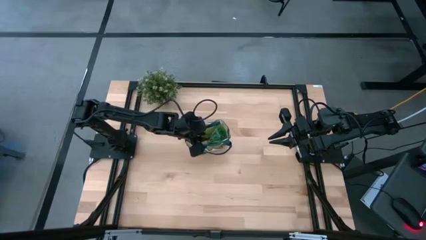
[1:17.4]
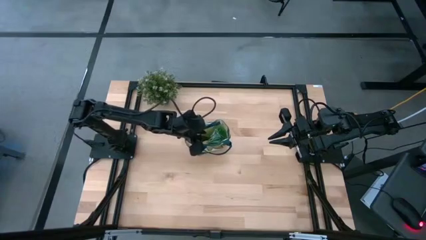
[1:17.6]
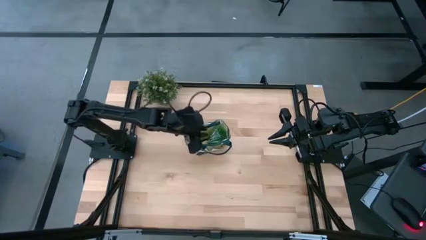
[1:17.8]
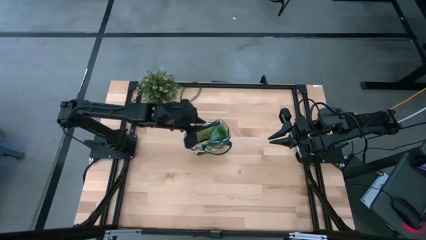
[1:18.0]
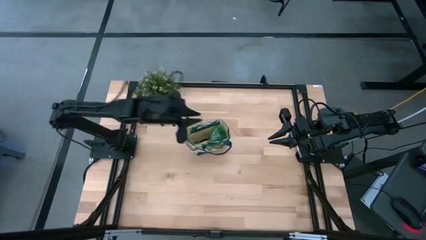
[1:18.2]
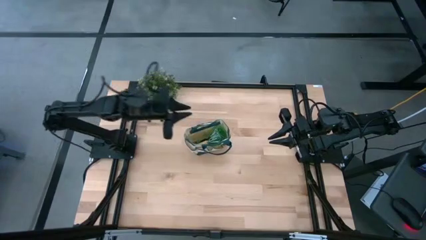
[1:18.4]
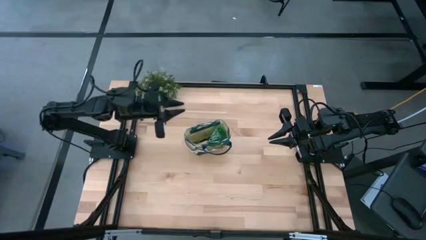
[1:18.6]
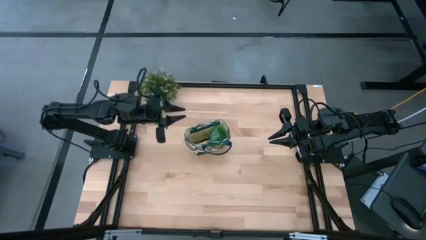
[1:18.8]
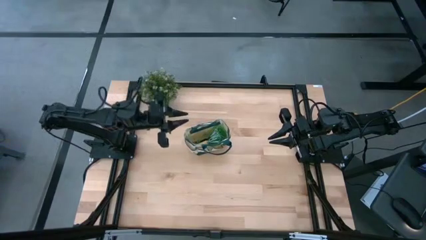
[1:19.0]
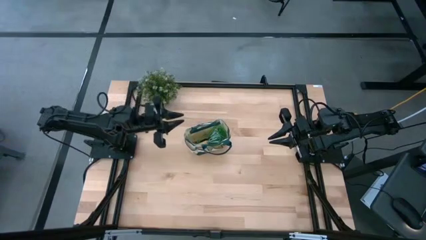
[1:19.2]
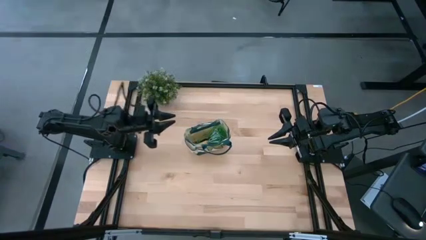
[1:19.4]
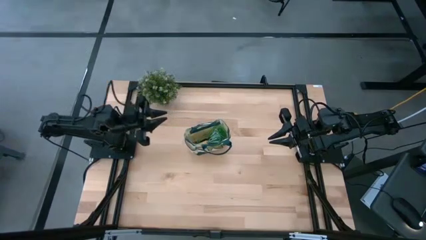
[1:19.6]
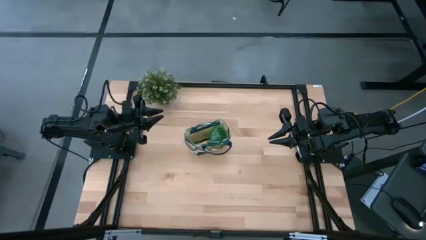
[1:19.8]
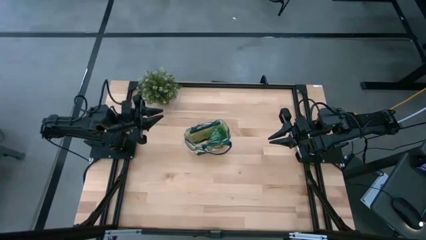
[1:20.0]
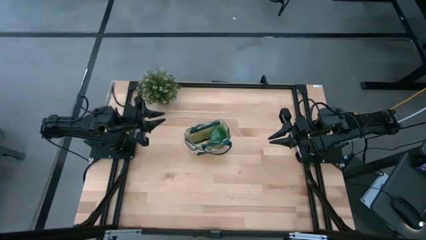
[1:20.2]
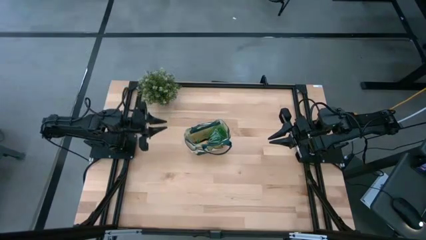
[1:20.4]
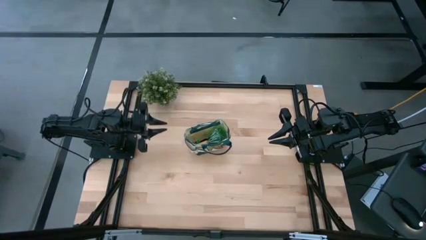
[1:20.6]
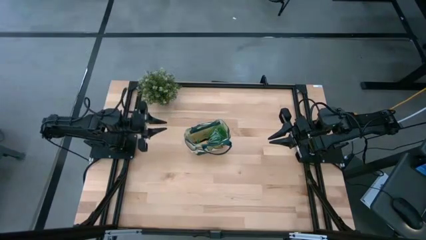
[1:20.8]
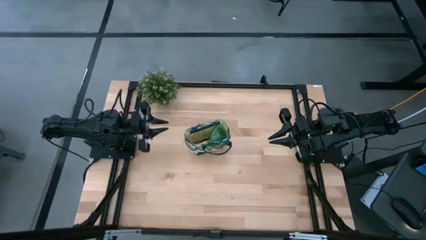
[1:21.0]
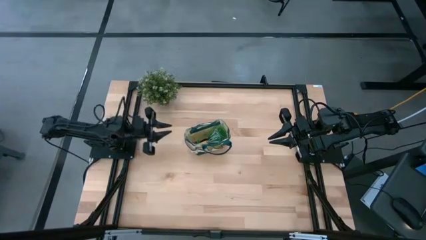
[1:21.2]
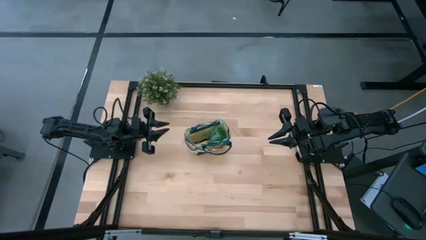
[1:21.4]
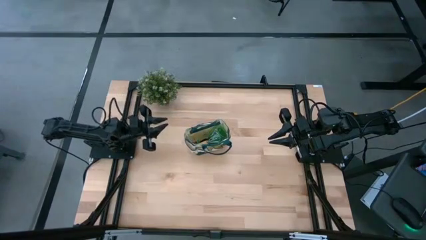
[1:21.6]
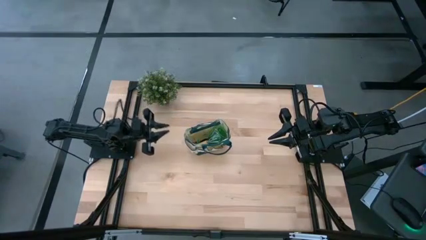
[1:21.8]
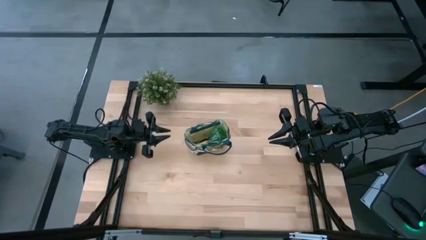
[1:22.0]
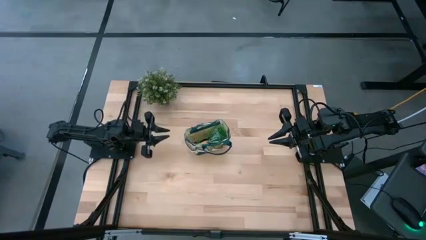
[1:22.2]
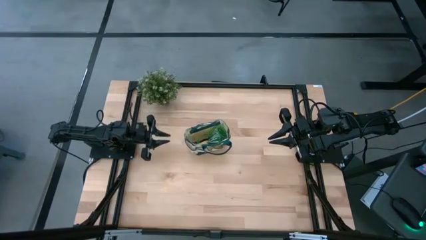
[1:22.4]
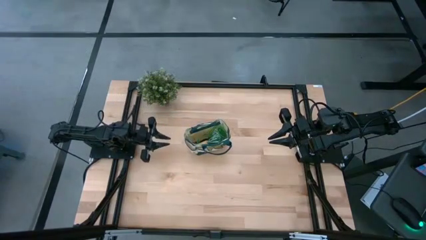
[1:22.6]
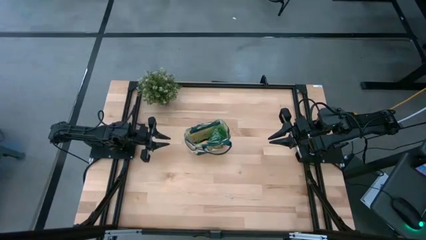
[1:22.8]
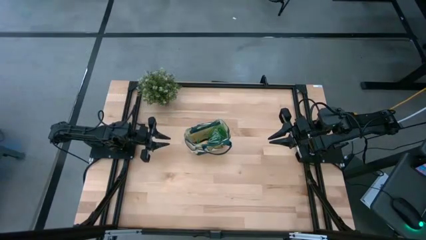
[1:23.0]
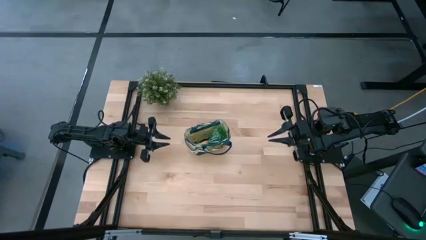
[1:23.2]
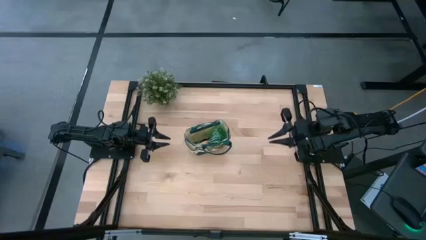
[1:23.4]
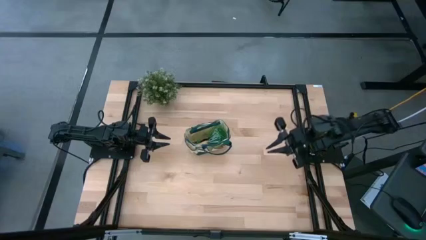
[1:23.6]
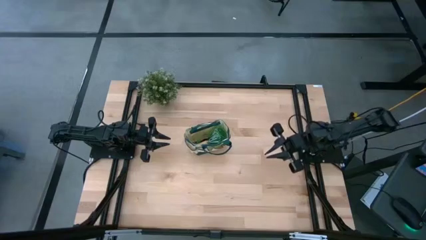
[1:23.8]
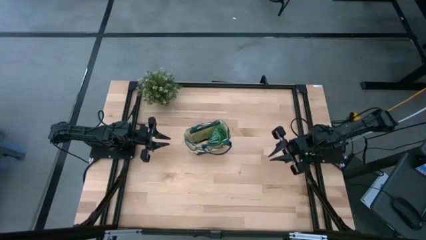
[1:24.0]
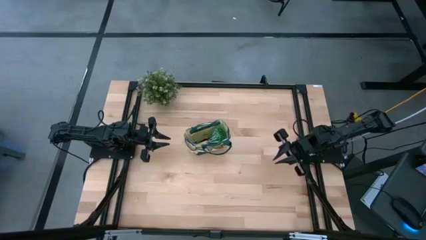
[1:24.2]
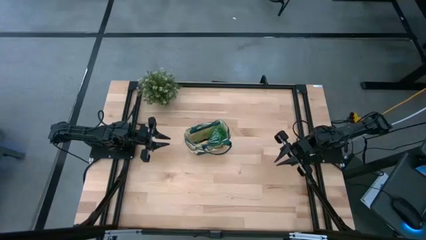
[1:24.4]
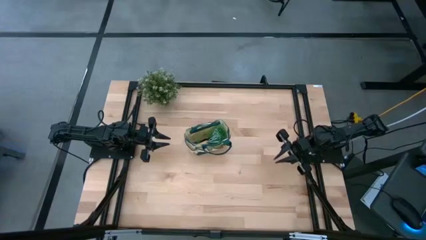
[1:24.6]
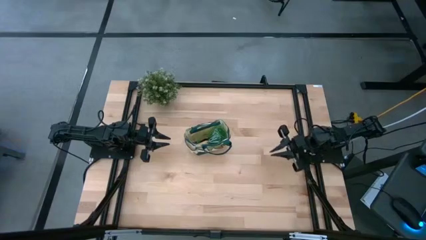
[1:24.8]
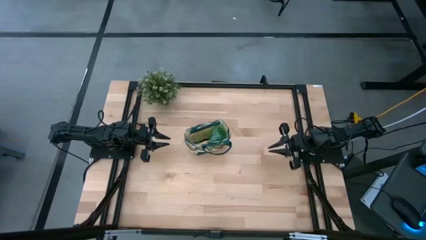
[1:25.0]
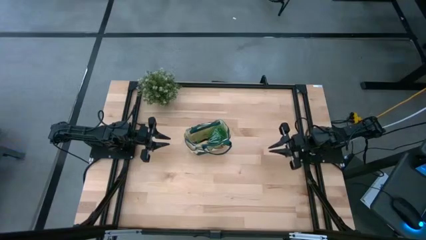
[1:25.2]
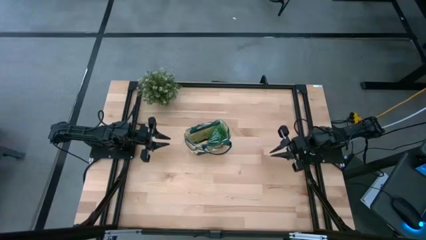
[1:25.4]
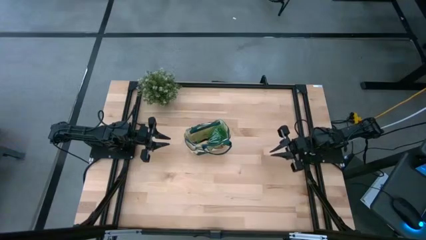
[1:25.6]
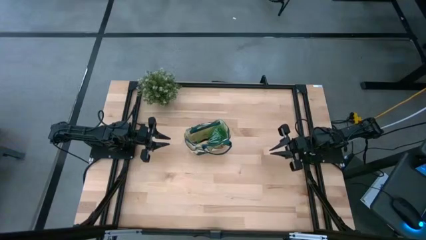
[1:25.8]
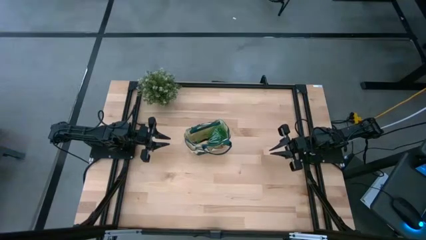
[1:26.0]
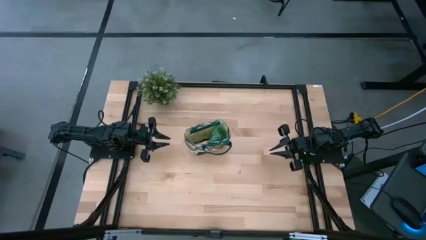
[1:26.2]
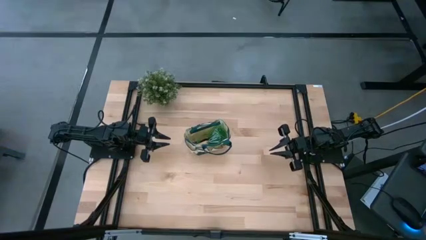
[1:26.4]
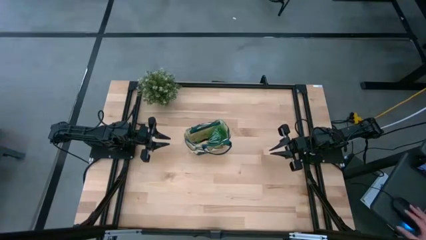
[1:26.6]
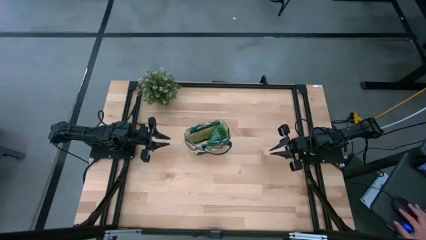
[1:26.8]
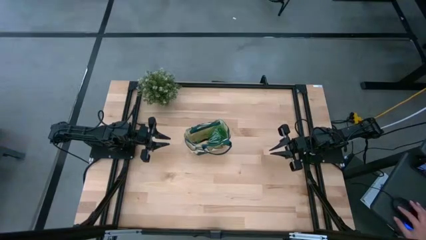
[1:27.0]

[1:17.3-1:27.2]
Task: Pick & Place Garden tools in Gardening bag
Return to Home Position

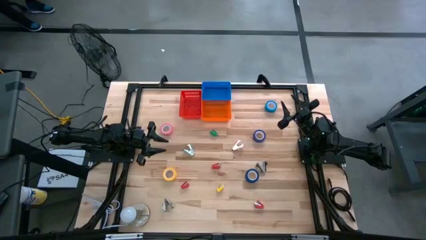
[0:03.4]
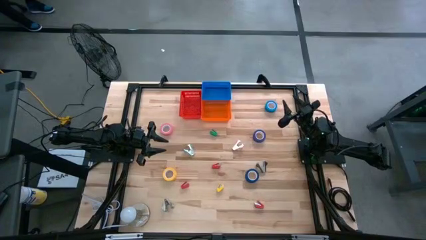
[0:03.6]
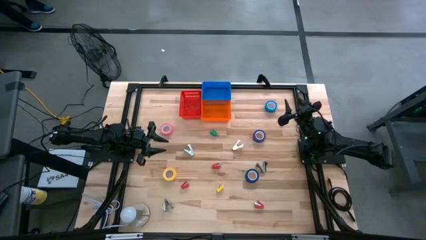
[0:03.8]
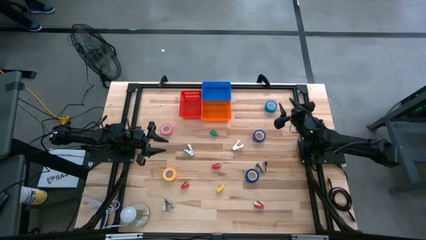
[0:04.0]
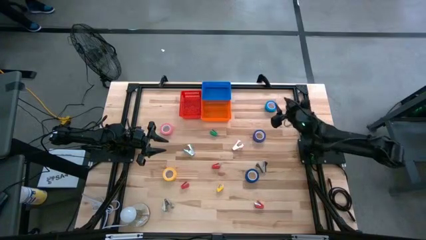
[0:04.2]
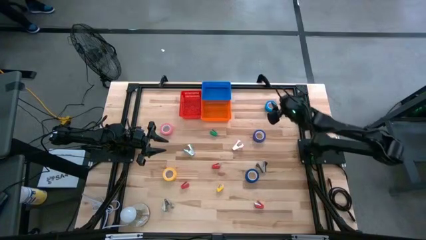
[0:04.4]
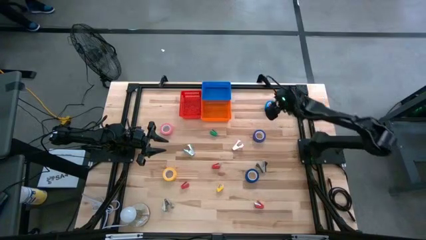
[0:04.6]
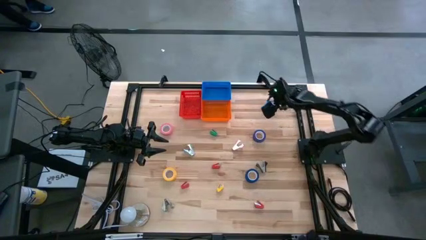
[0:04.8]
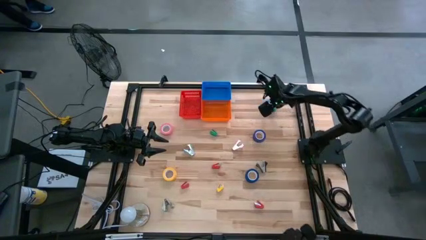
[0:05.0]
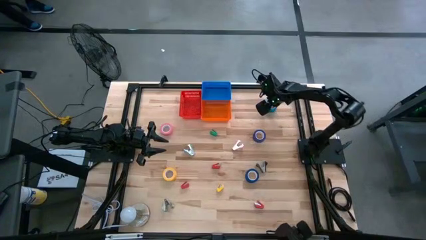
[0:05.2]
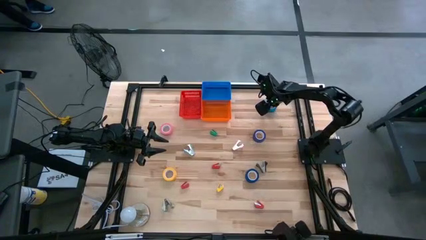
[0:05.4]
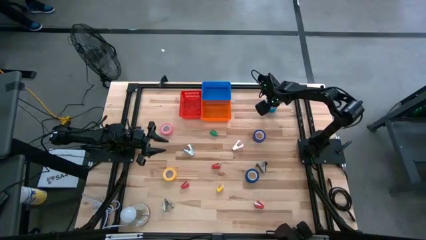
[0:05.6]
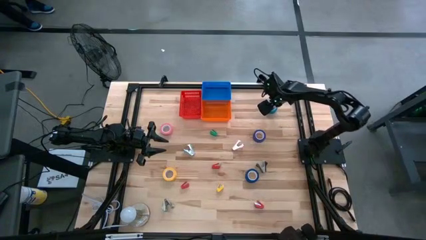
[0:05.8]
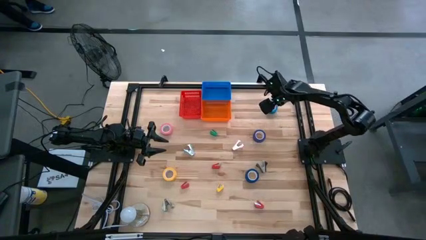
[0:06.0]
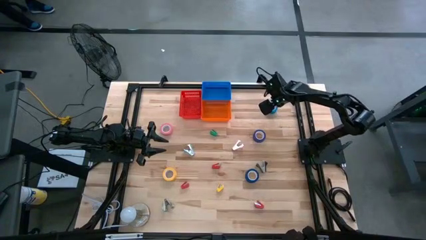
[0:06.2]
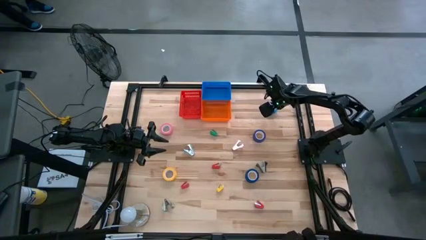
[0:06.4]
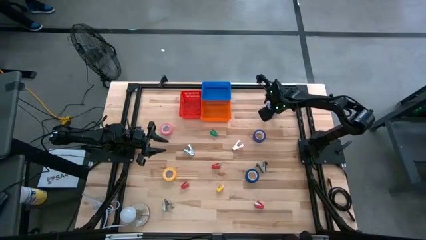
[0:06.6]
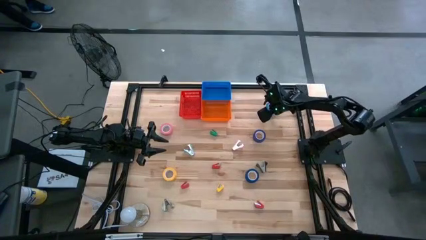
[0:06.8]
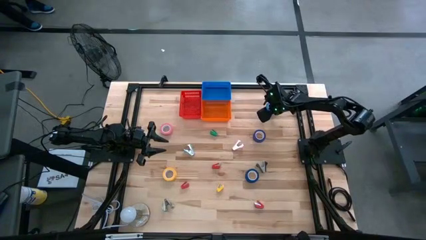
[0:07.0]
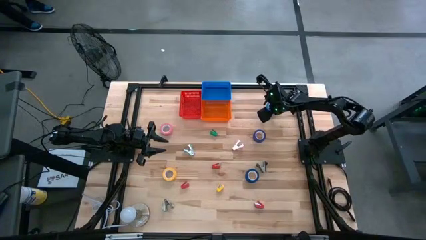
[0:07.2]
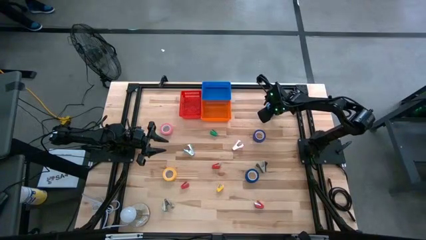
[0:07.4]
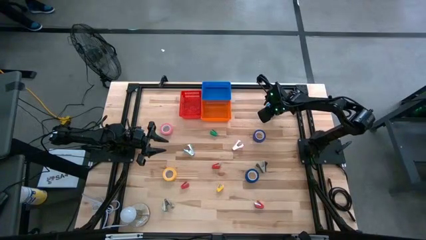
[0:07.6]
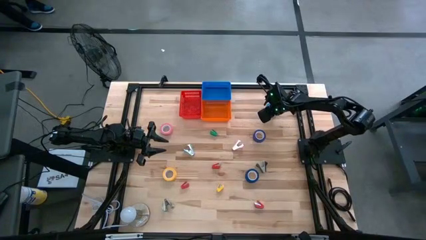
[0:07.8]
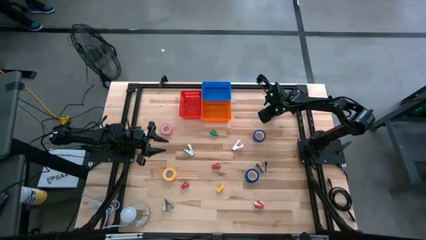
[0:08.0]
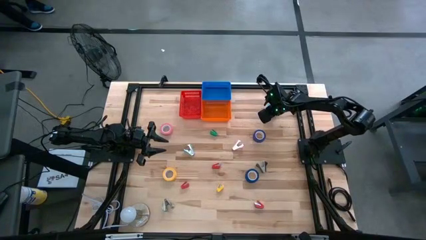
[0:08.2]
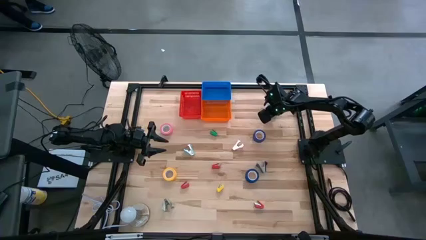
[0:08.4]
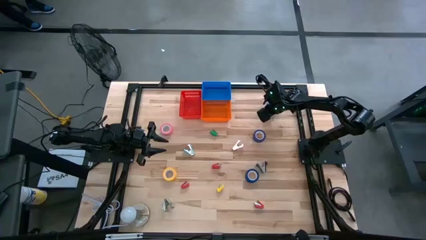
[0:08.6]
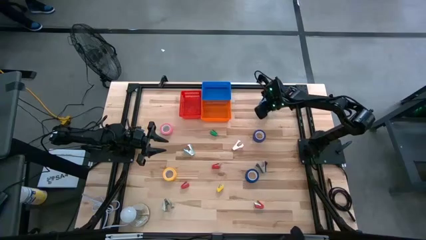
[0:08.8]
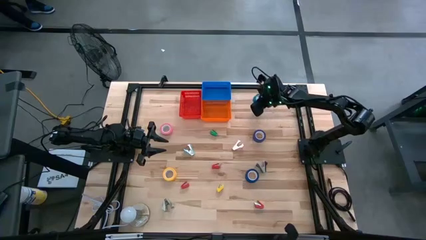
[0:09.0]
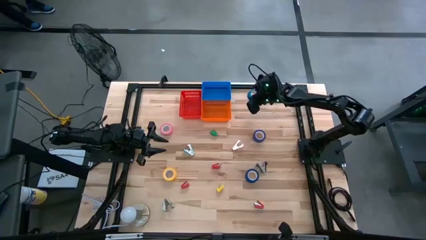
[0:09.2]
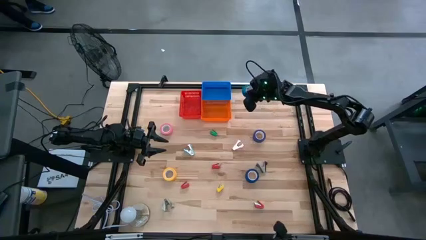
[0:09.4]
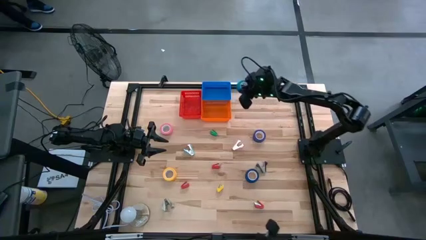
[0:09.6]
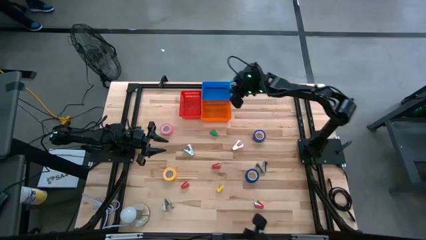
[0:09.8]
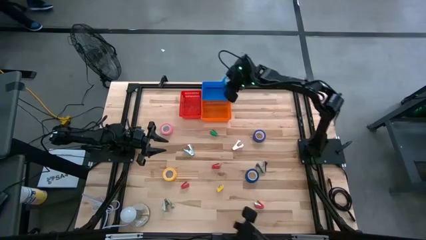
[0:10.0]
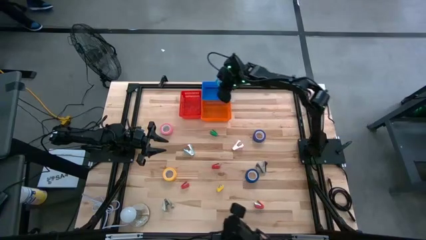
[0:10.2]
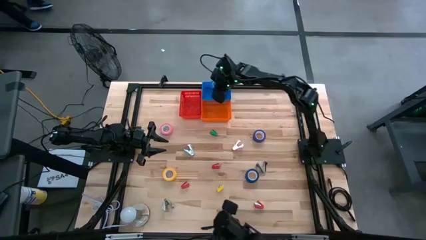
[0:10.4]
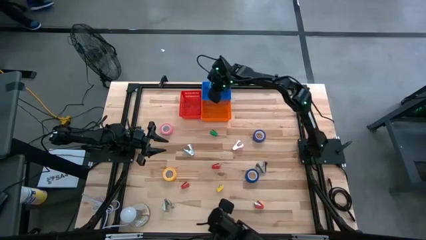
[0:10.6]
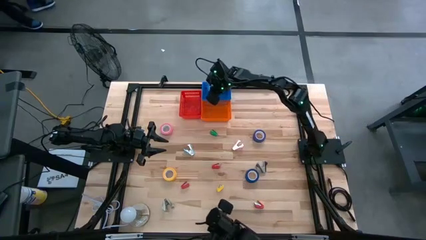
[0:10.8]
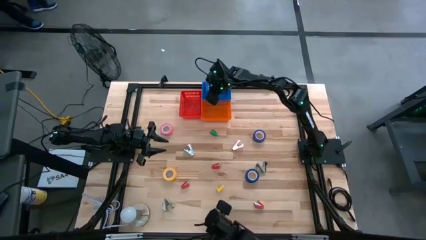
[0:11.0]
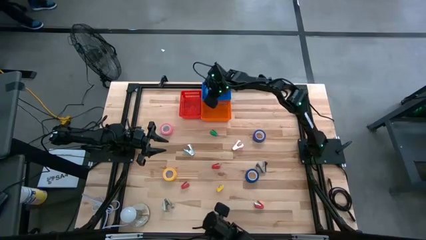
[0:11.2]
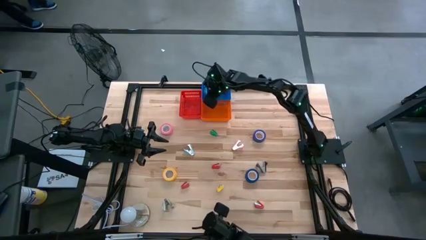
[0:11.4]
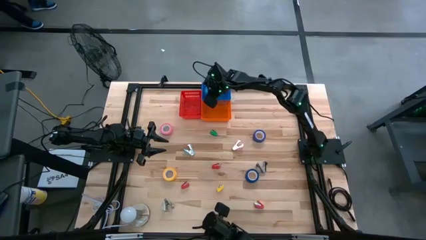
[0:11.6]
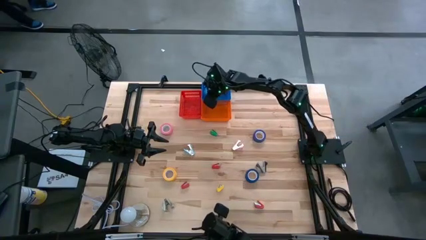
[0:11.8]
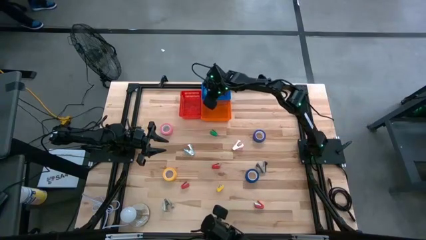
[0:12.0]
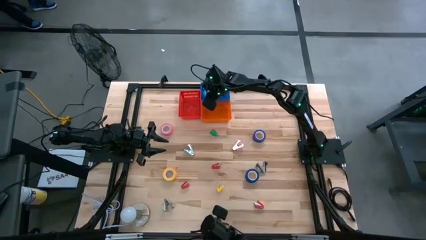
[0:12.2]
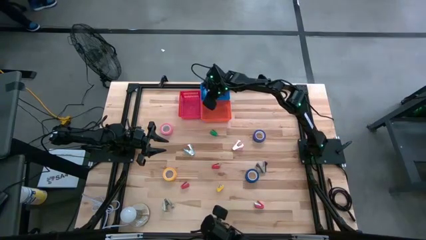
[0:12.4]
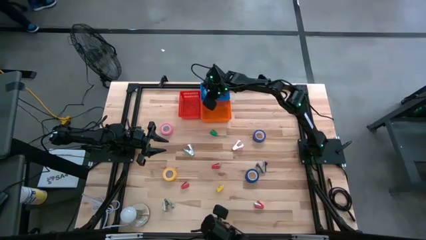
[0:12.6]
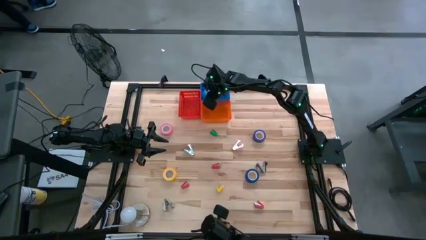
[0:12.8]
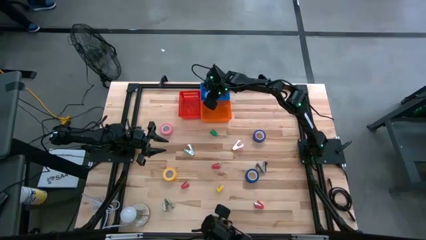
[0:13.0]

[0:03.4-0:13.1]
Task: Pick and place Stapler, Stapler remover, tape
Put the light blue tape into the blue bin
